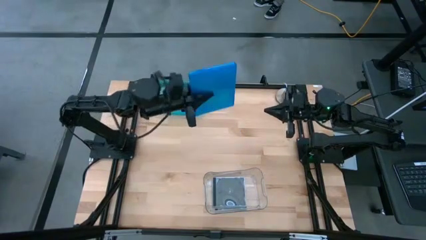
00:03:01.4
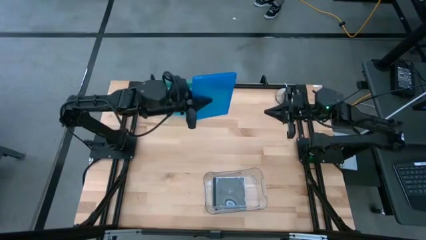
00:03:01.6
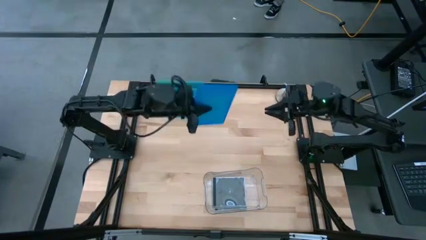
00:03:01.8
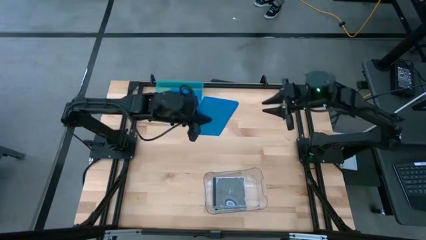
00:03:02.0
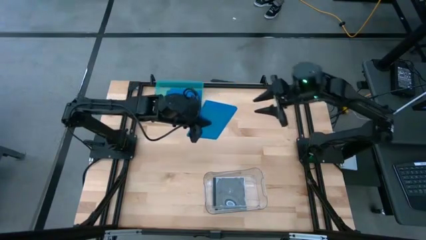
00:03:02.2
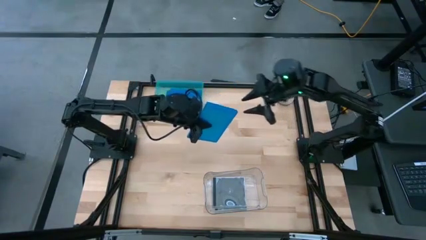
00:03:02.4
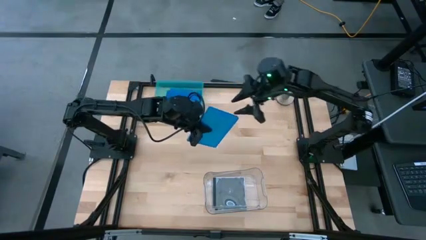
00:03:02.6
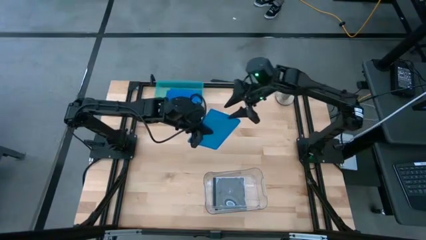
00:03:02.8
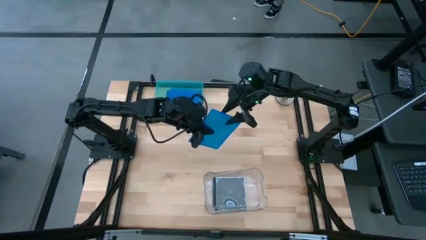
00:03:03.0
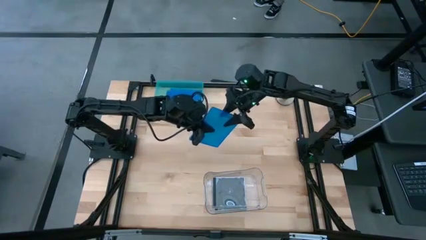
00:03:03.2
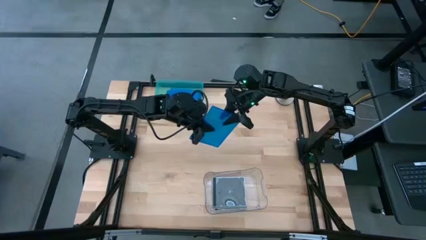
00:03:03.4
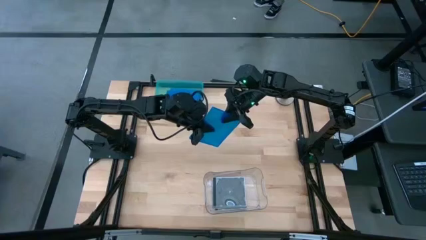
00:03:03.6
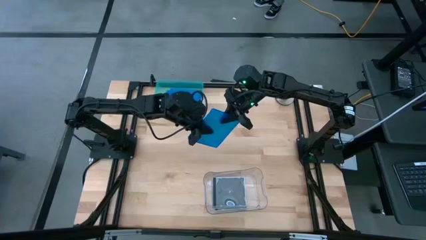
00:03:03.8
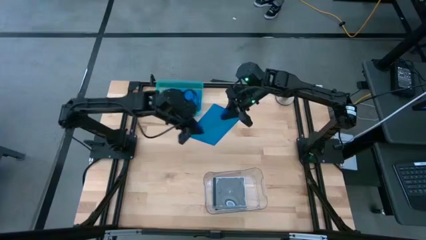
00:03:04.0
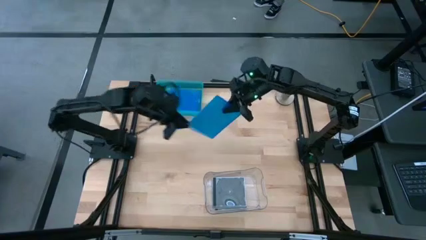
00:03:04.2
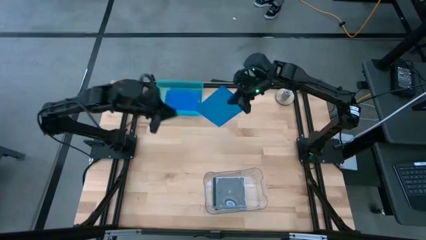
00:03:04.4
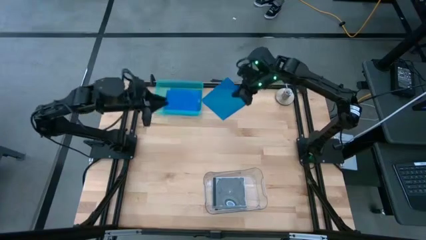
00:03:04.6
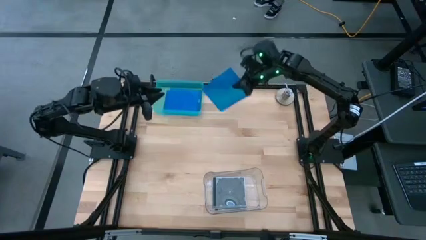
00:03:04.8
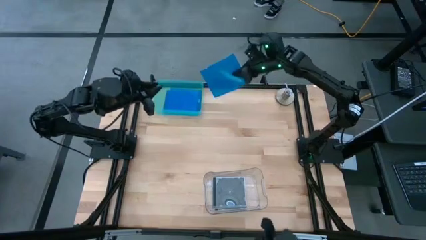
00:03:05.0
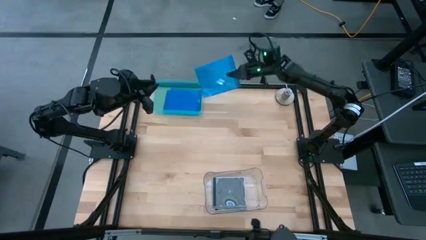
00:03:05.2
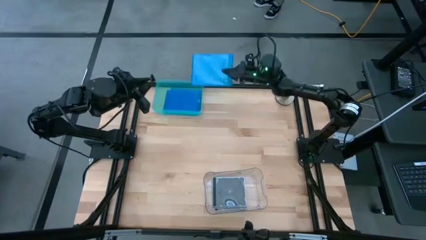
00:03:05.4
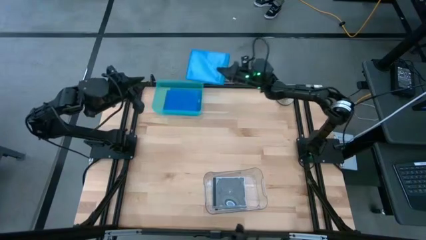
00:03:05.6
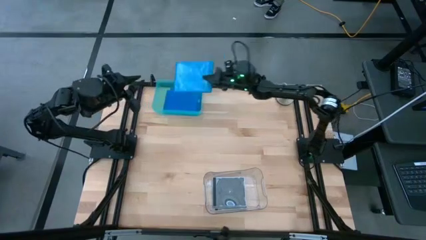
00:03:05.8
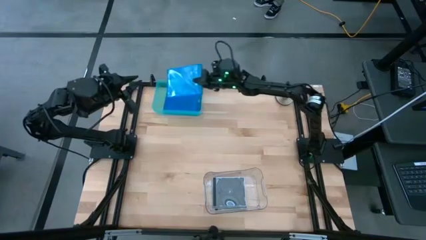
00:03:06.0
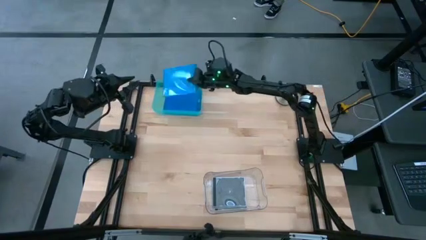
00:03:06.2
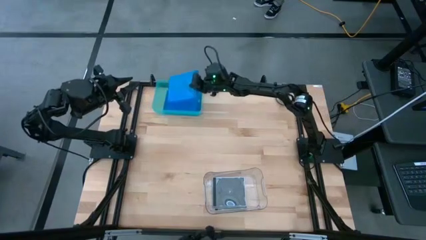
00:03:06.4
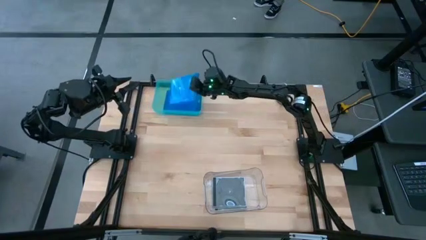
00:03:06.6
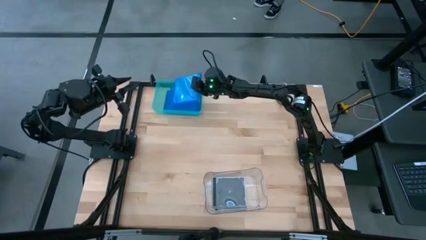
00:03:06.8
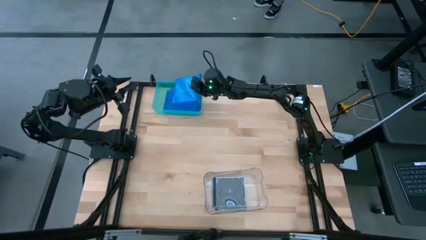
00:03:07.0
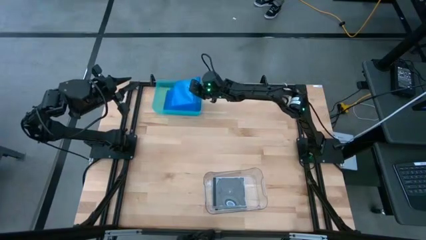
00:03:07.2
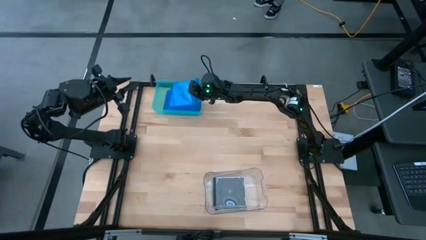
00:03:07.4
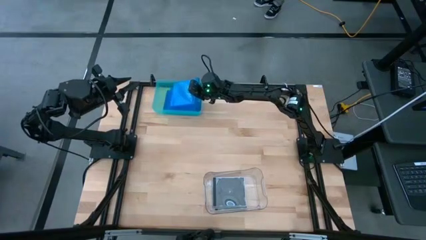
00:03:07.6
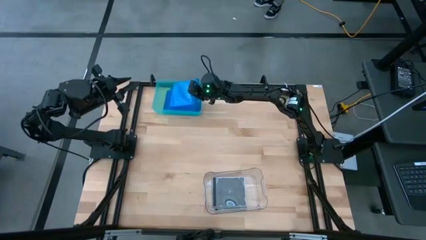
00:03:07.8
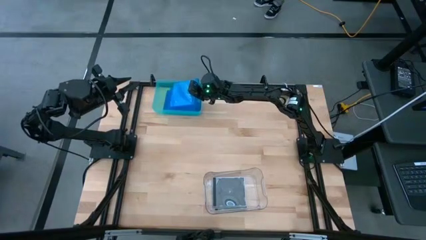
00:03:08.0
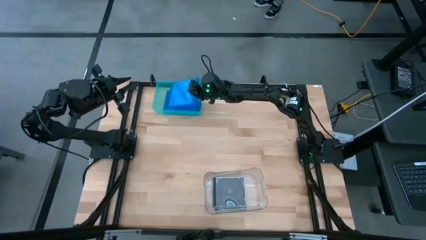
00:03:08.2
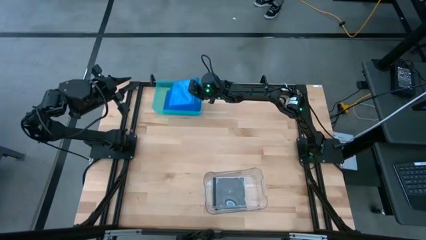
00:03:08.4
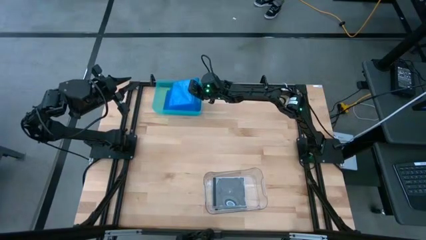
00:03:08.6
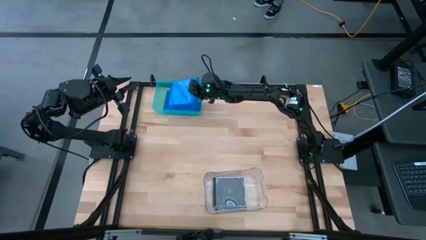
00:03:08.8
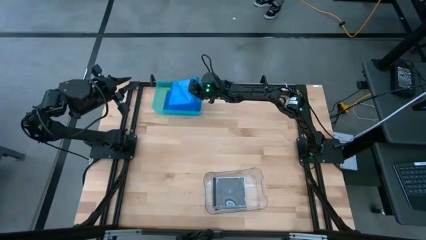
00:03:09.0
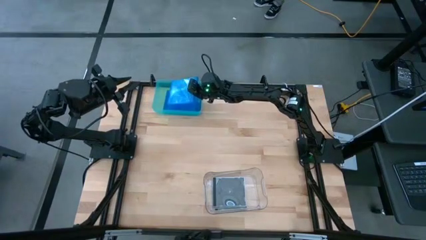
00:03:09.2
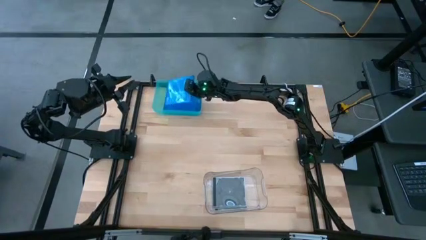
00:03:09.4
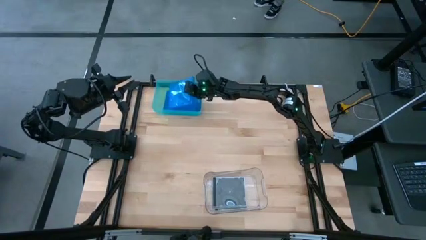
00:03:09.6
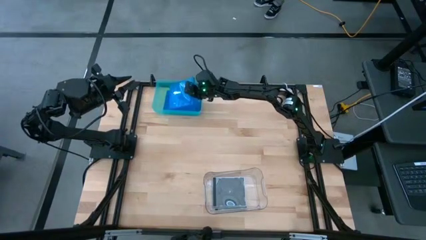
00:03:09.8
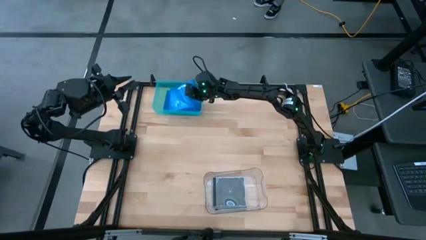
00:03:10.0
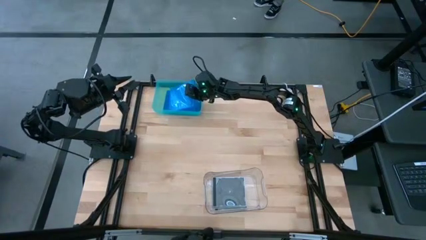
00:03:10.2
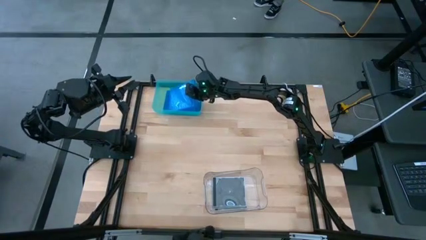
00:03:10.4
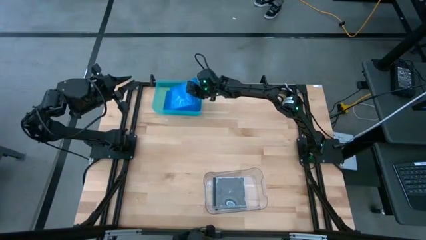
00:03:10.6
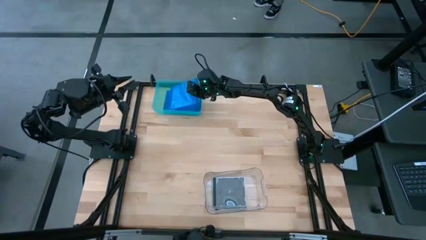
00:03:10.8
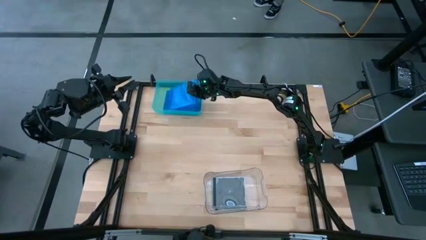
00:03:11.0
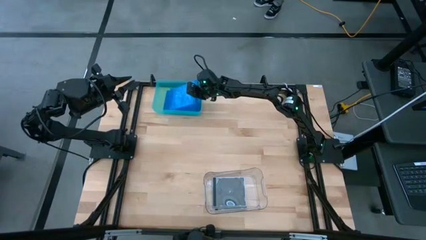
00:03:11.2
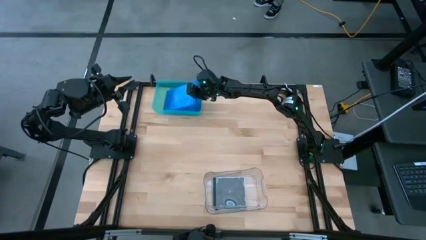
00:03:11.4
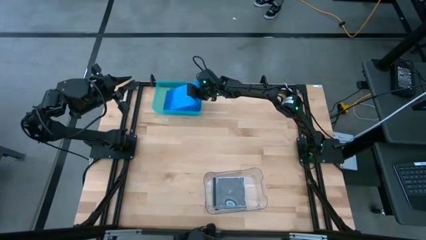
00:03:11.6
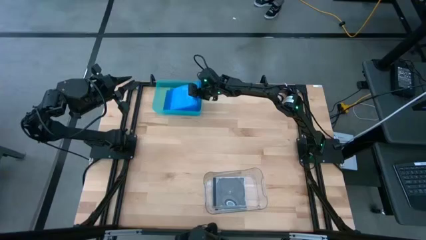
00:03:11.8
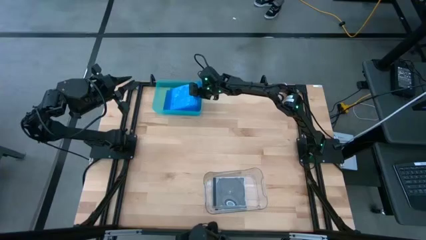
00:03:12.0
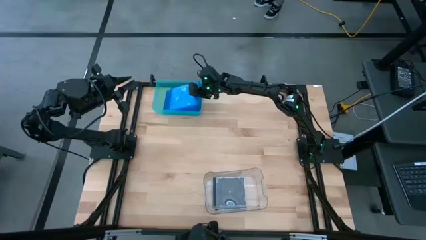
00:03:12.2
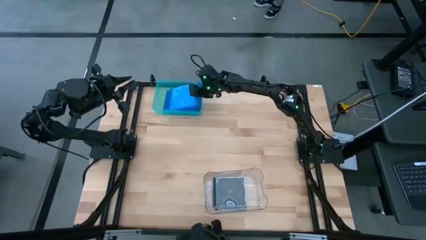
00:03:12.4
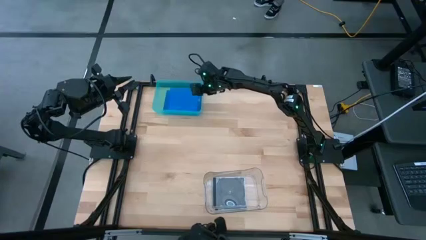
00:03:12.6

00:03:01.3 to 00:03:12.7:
Task: Pick & place jewel cases by type
Put the dark blue CD case into the light blue bin

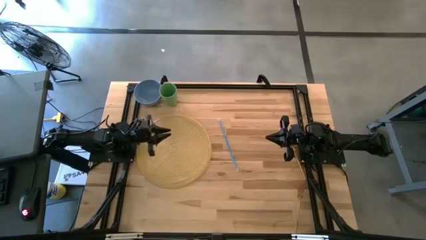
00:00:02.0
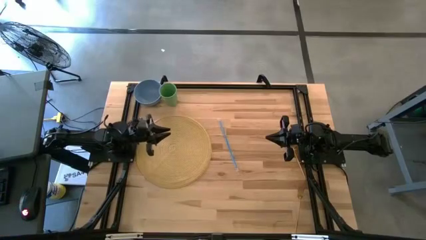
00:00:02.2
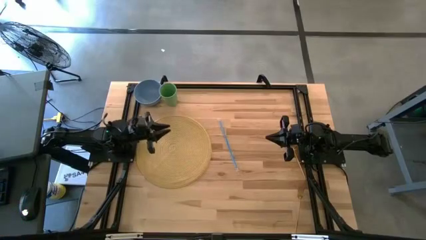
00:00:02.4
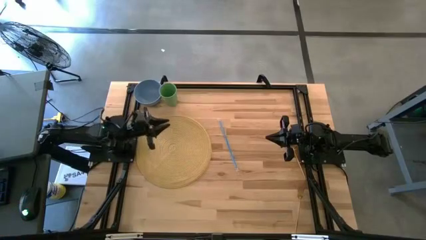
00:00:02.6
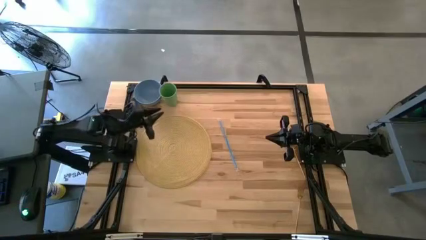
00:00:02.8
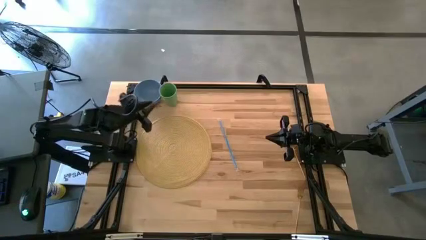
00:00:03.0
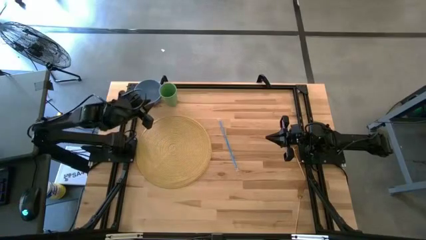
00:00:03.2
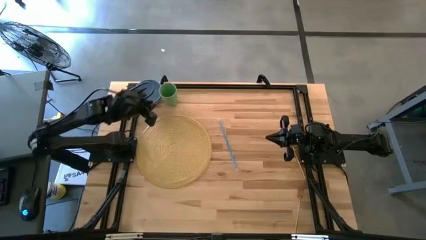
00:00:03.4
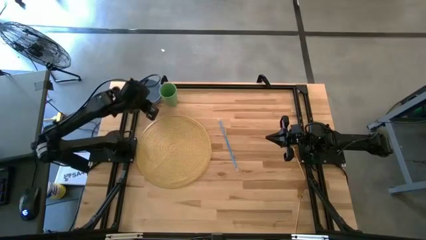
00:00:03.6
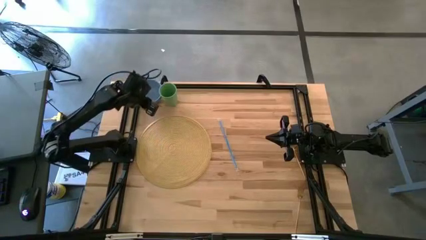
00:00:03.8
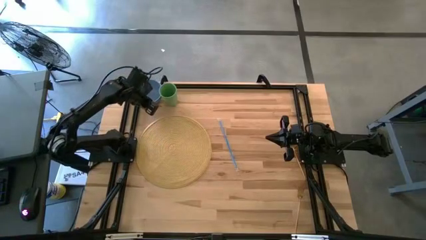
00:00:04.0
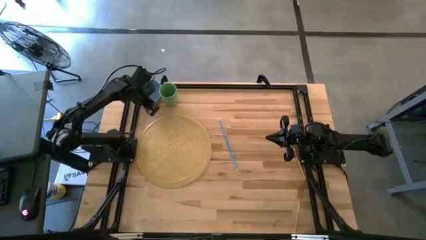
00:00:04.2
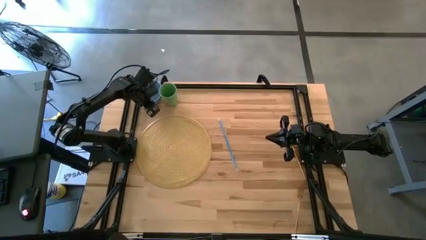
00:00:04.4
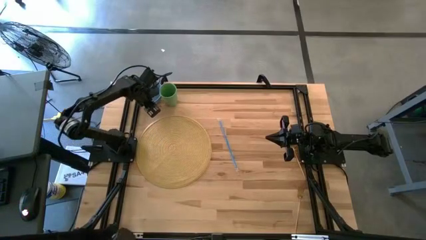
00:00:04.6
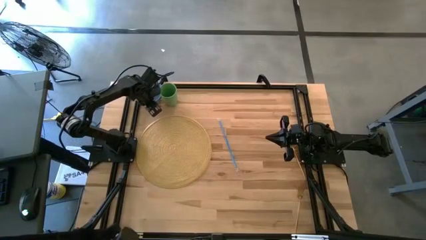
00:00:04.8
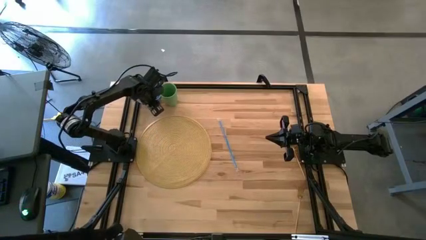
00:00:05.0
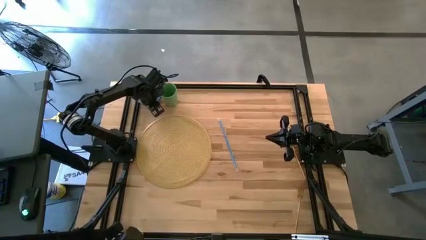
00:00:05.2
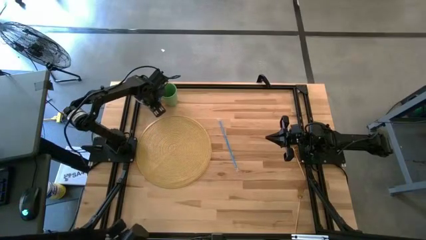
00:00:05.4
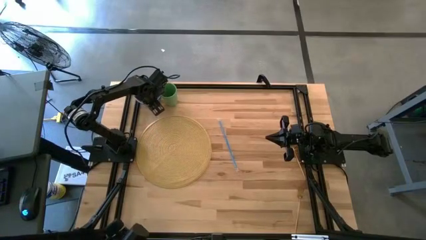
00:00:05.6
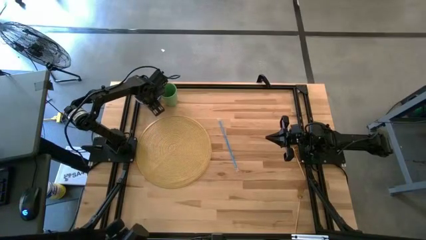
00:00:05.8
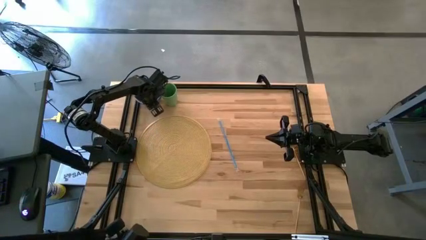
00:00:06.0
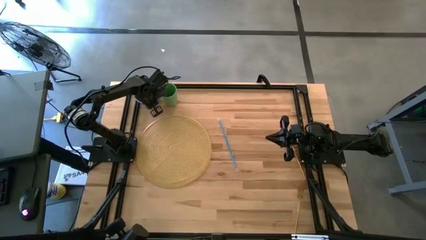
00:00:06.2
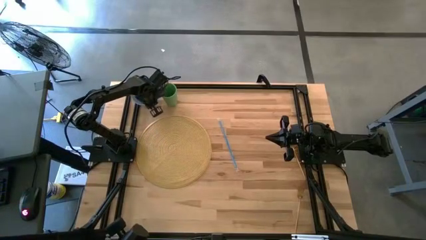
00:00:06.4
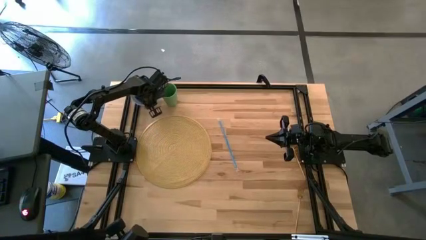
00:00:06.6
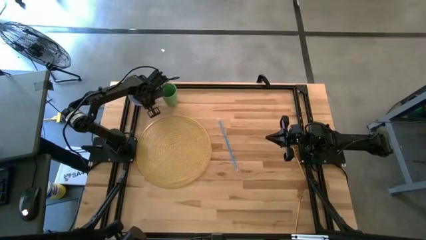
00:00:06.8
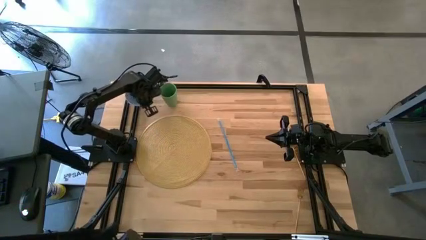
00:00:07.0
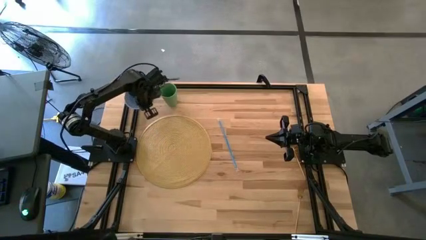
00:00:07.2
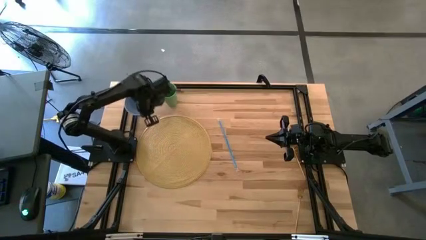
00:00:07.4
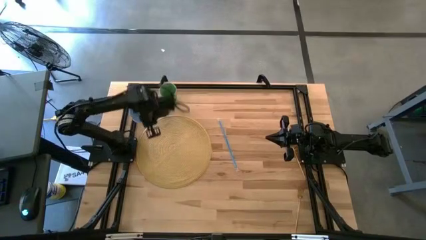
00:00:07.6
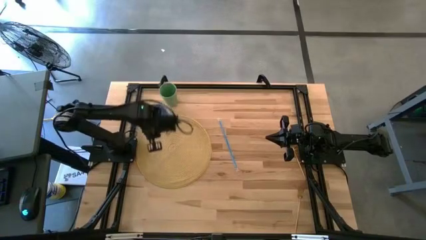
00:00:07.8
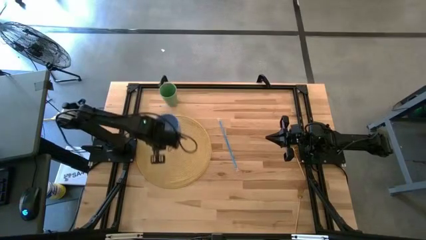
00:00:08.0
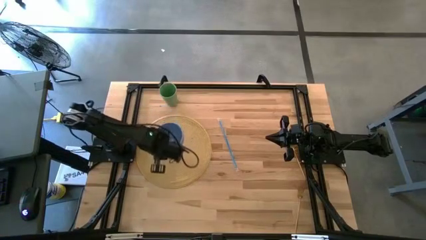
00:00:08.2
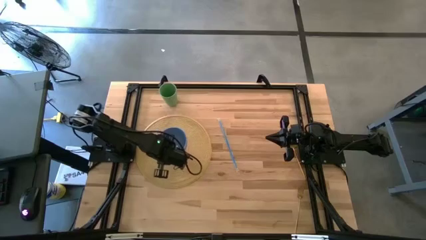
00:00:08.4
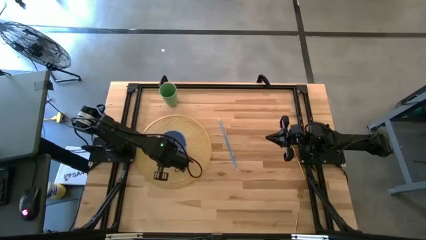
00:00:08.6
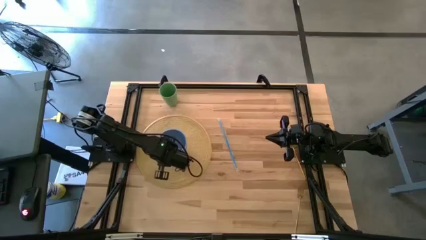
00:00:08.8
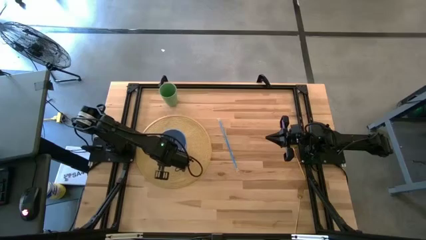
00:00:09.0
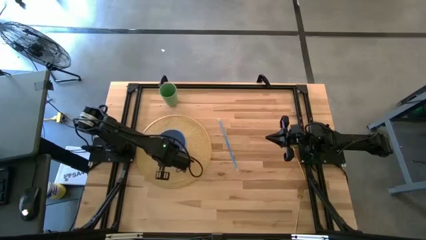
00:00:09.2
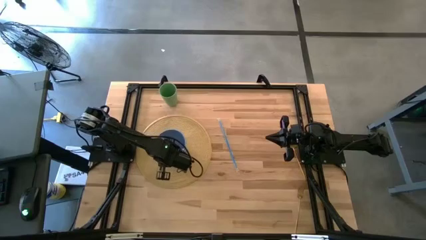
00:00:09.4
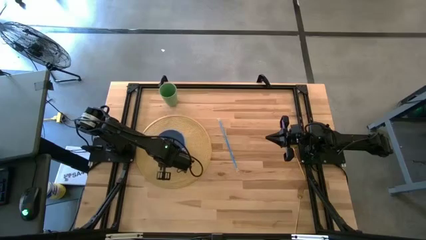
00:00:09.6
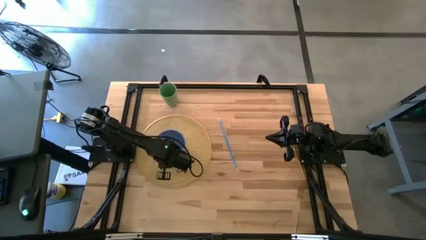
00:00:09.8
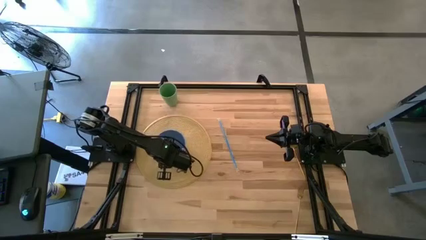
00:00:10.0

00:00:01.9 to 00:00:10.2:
Task: Pick & Place Utensil
Put the blue bowl on the brown mat
